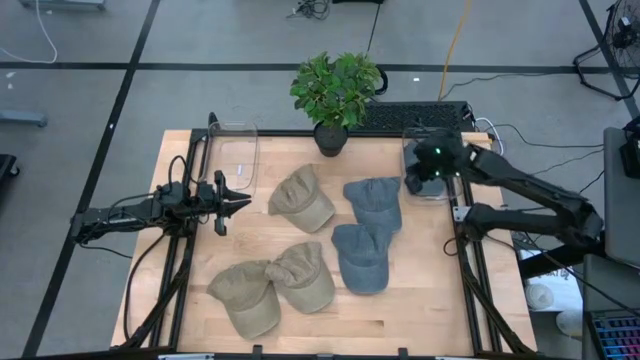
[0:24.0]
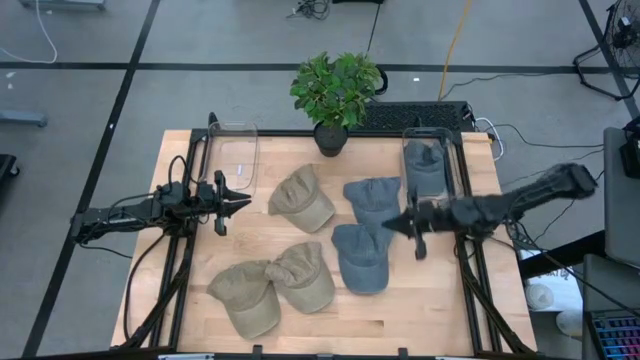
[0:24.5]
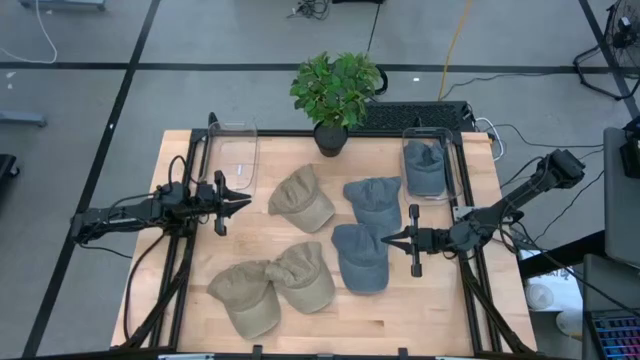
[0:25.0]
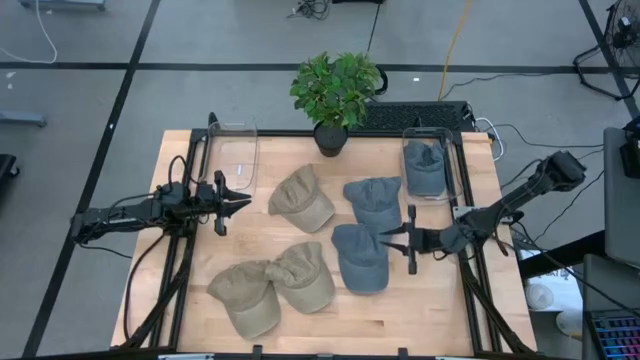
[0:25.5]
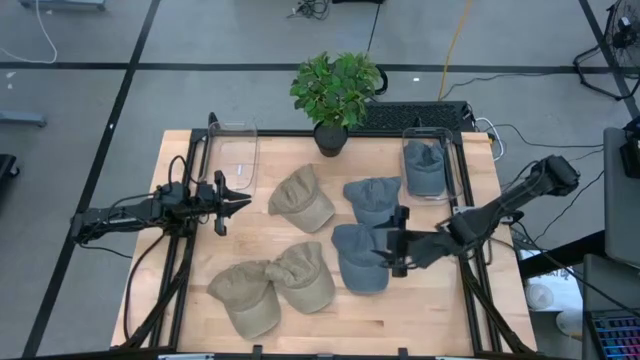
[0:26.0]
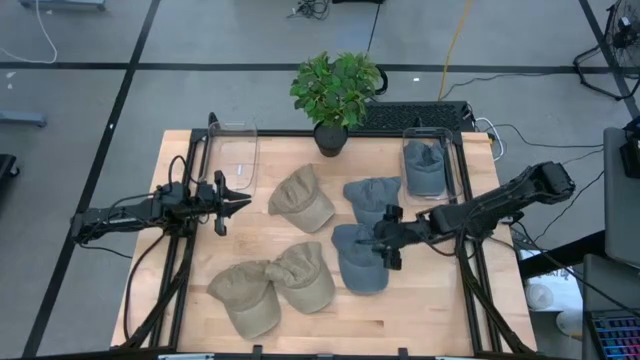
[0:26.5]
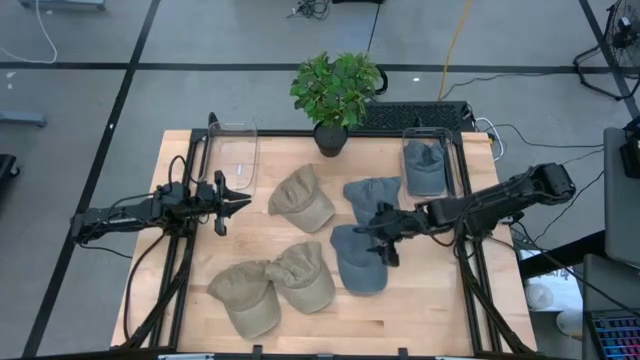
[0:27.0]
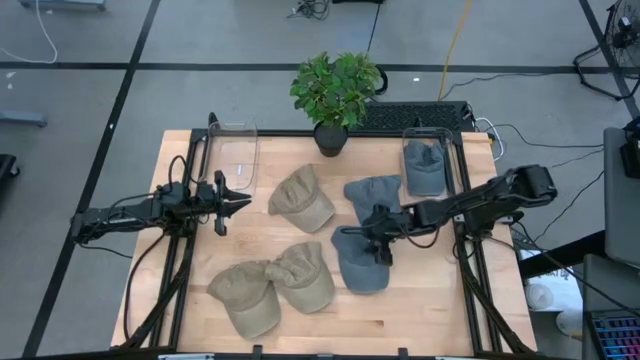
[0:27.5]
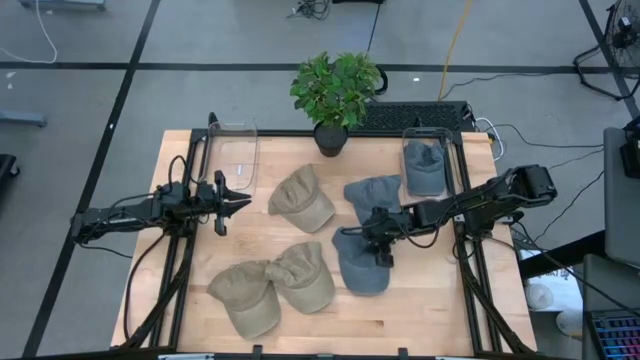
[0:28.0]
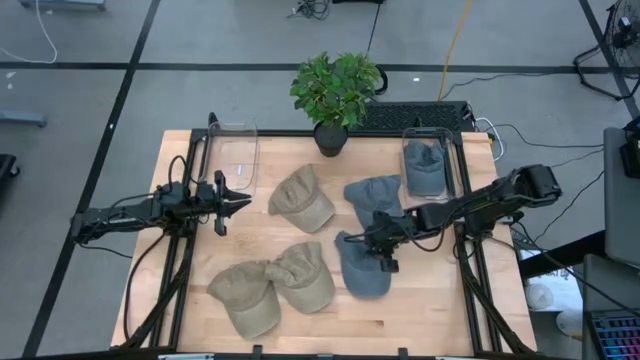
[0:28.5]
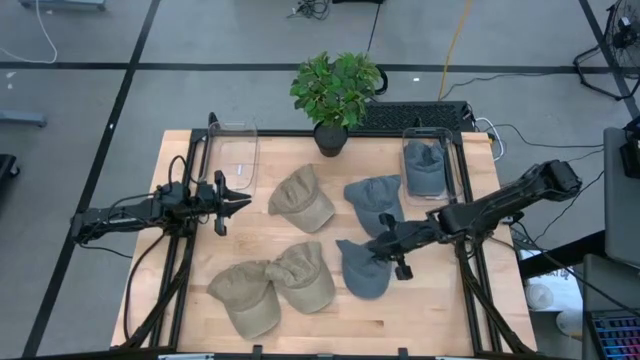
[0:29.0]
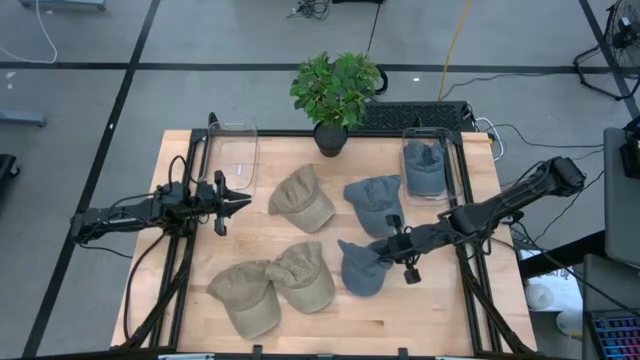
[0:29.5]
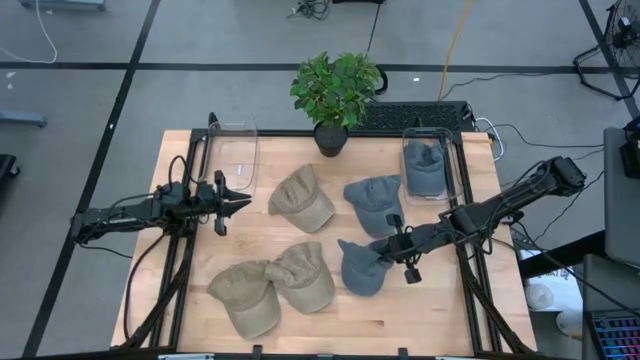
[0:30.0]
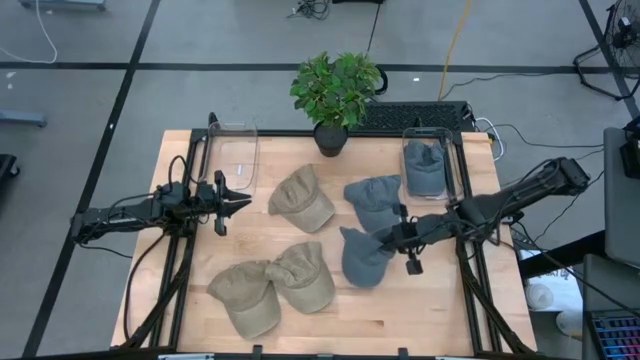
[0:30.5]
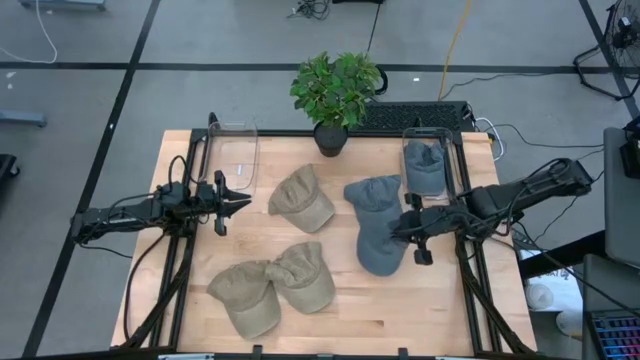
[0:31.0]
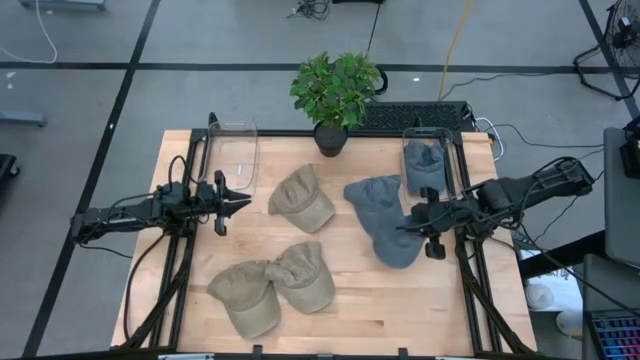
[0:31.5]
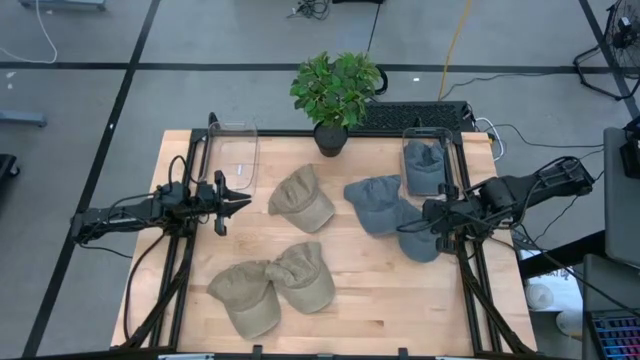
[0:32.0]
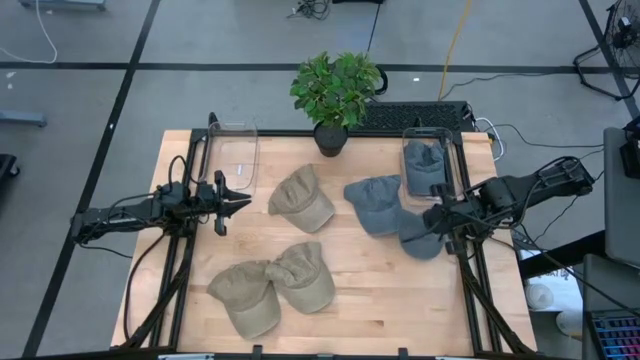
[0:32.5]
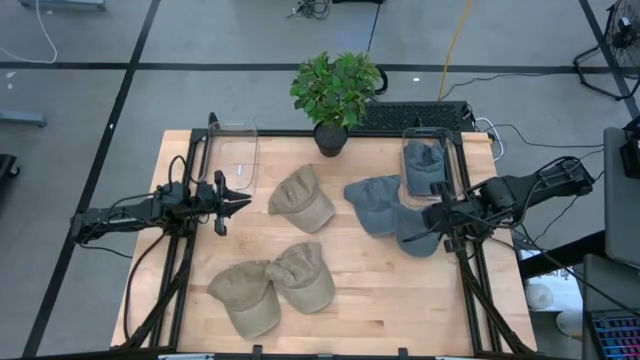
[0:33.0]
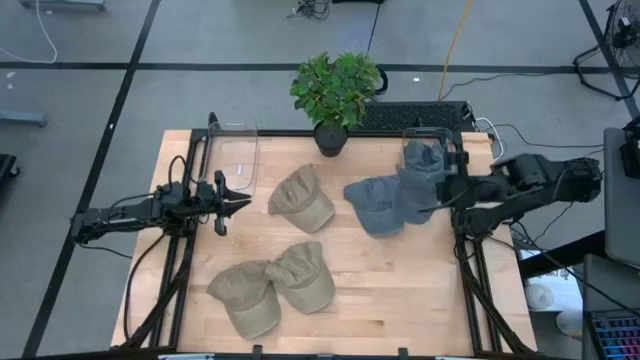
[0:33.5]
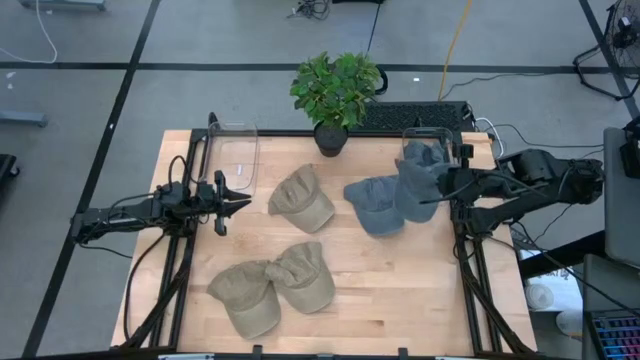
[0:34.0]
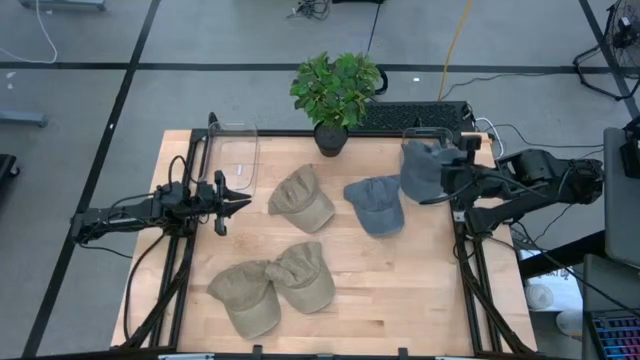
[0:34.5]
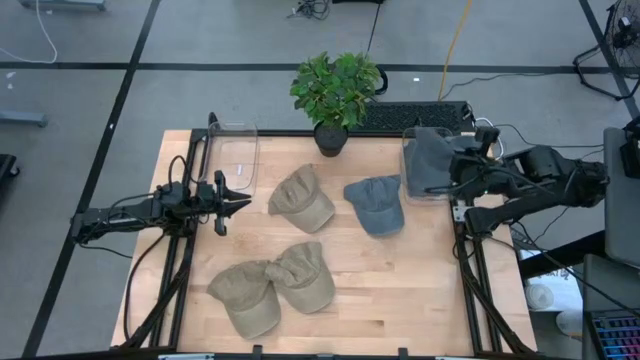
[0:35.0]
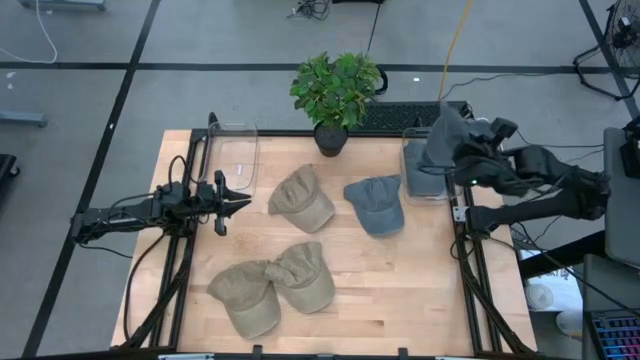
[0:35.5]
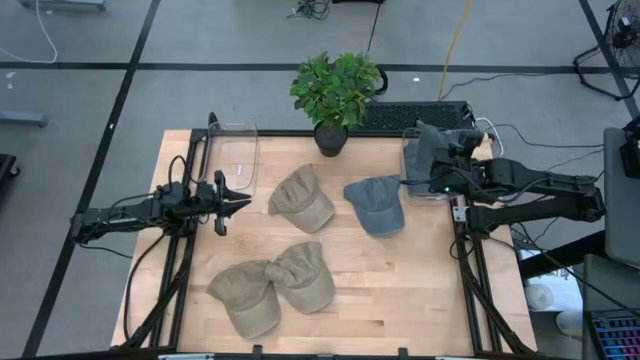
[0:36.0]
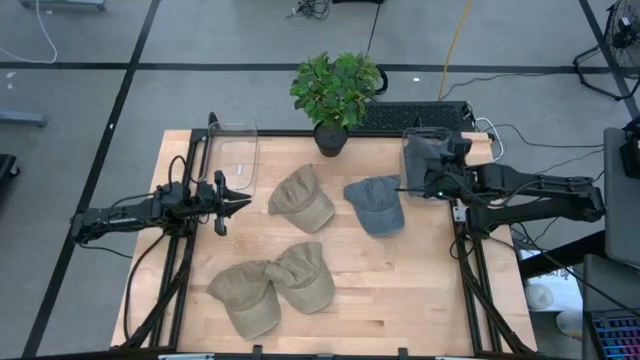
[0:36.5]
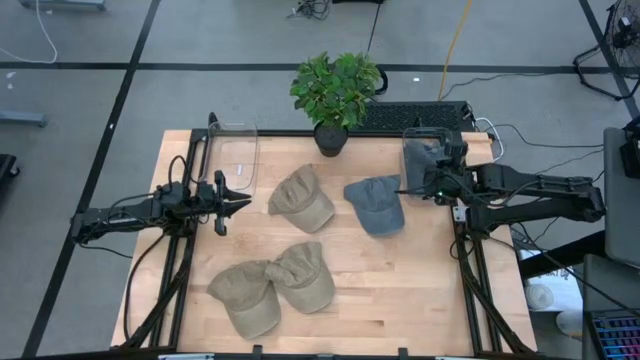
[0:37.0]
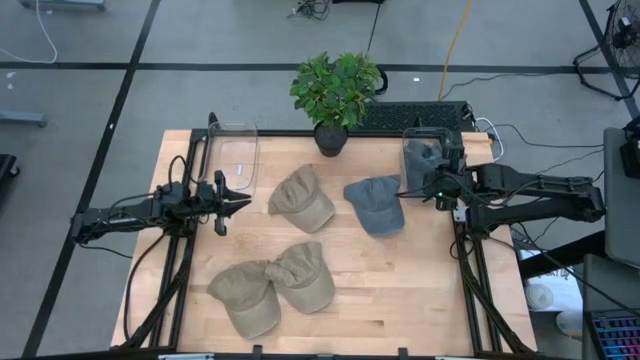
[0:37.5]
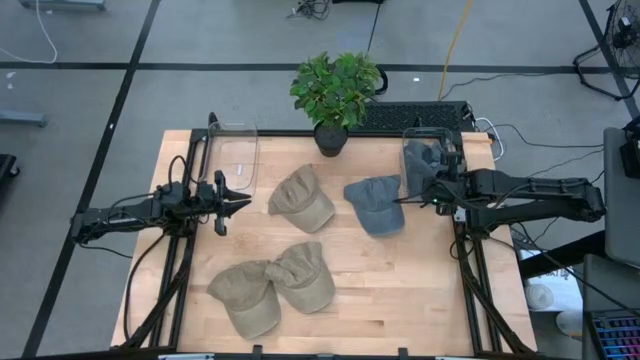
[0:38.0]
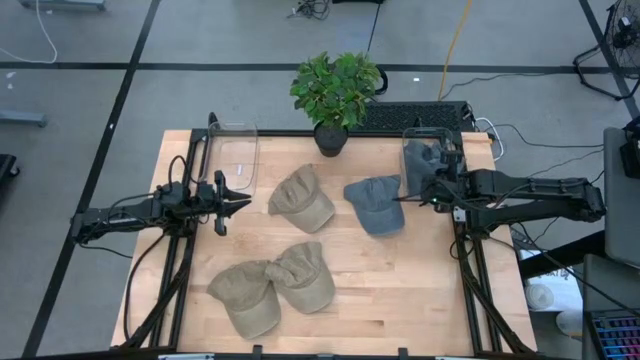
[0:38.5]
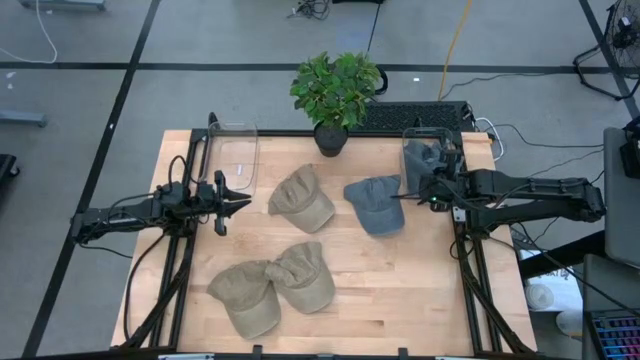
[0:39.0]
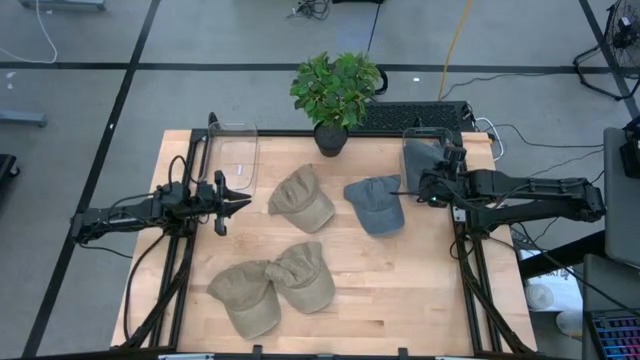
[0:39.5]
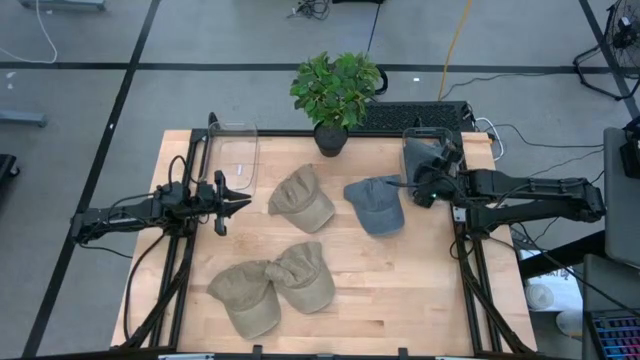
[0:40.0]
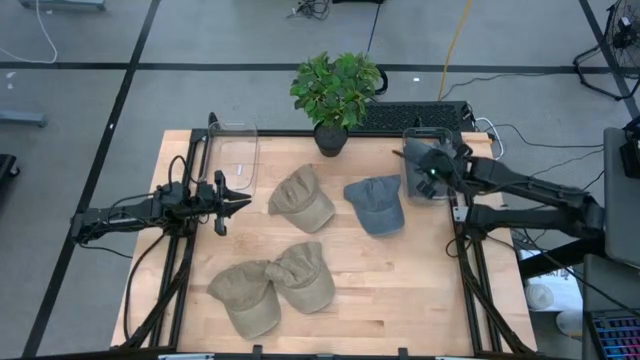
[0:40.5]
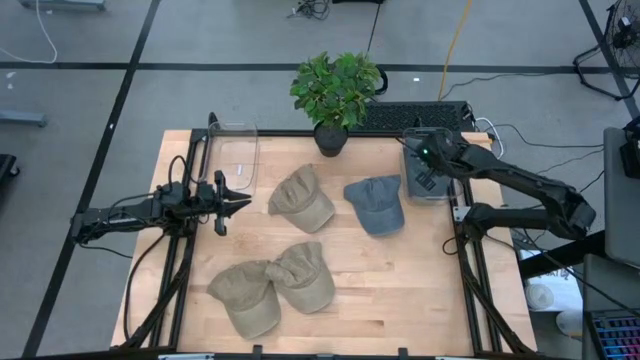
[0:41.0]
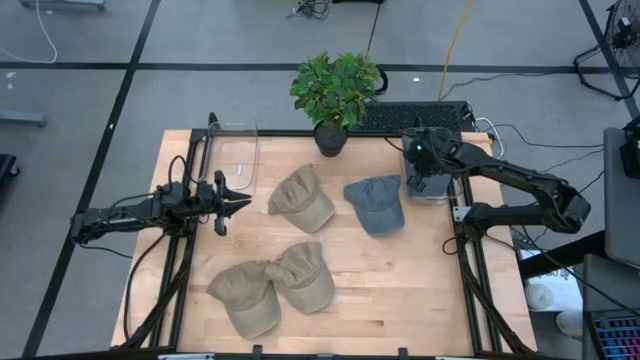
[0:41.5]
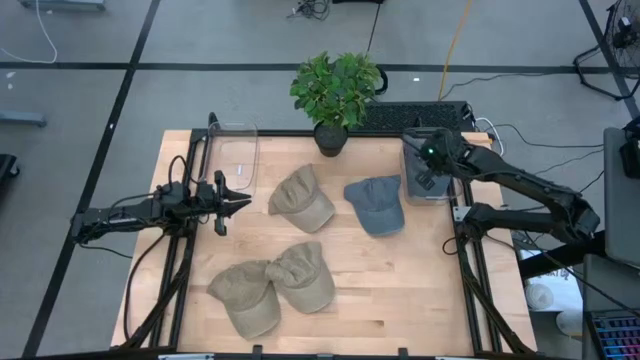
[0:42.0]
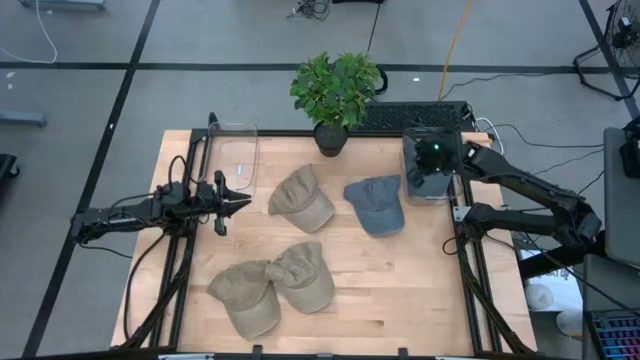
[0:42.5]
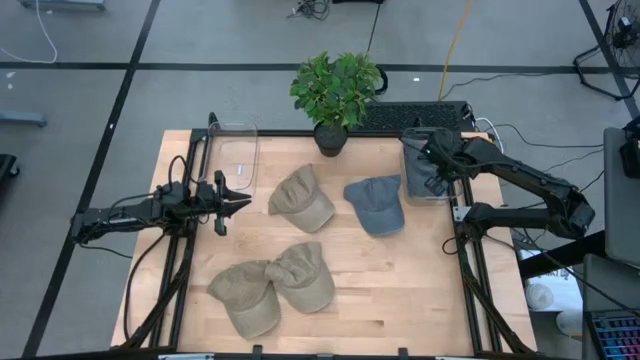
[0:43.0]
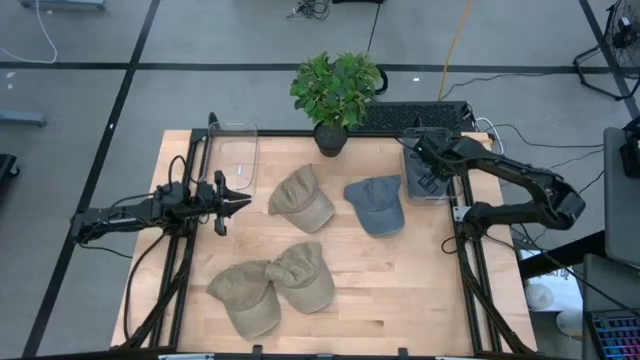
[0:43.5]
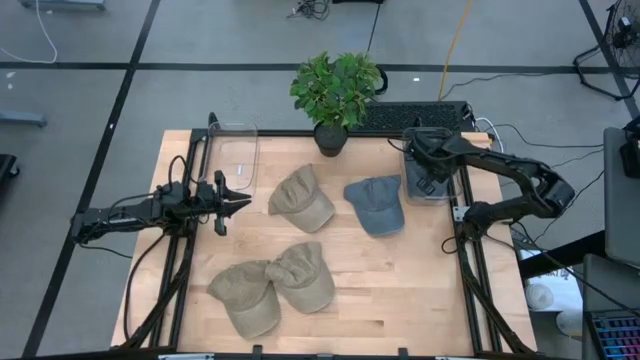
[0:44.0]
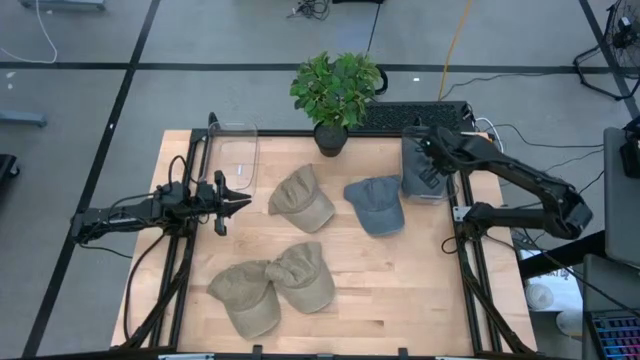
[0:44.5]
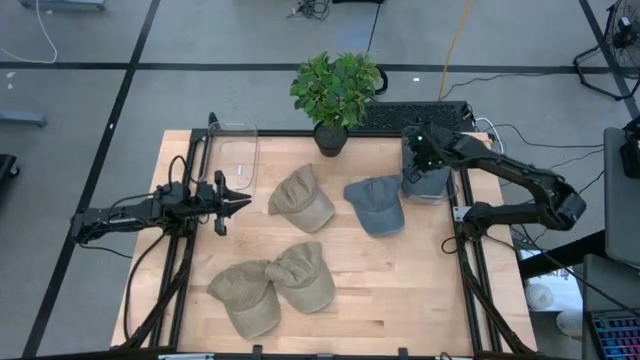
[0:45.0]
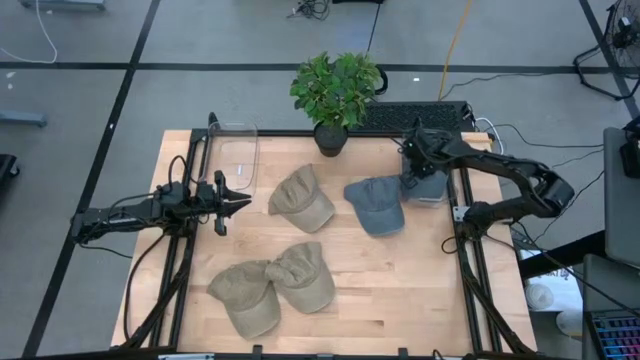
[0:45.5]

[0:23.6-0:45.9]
Task: Pick & Place hat
Put the bottom blue cap into the right transparent bin
